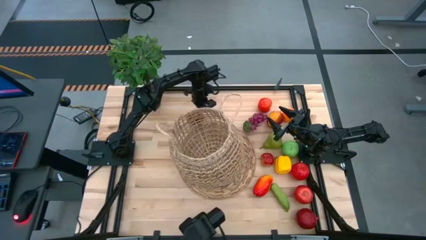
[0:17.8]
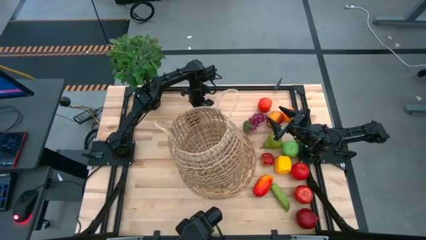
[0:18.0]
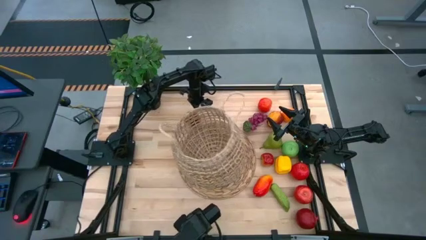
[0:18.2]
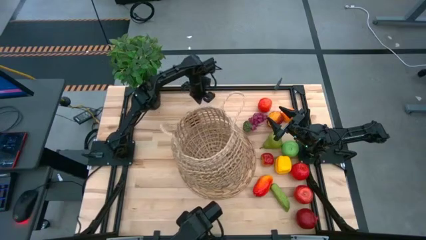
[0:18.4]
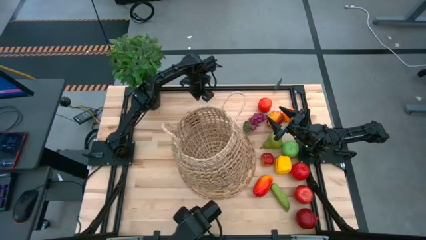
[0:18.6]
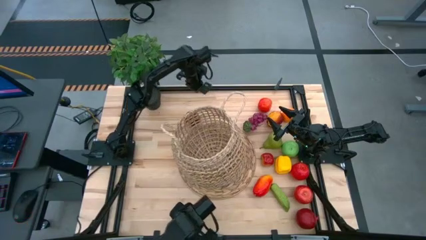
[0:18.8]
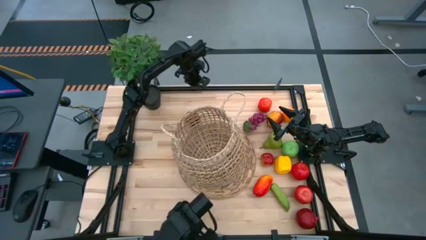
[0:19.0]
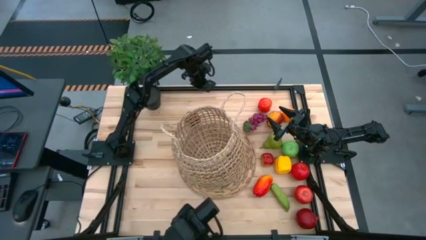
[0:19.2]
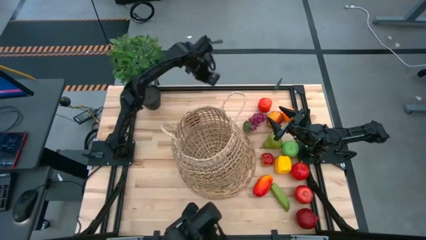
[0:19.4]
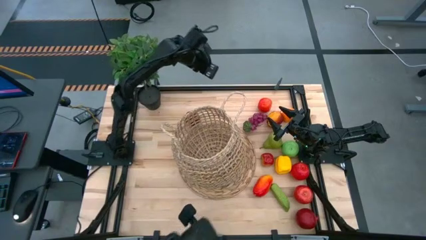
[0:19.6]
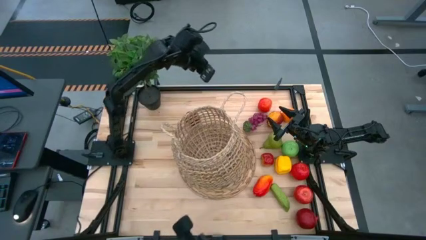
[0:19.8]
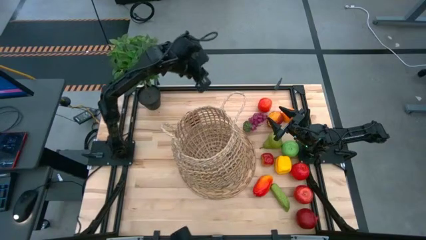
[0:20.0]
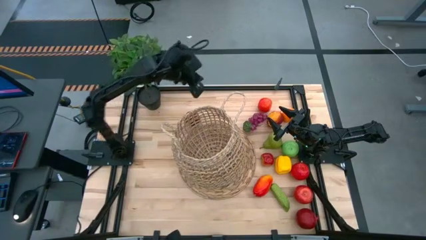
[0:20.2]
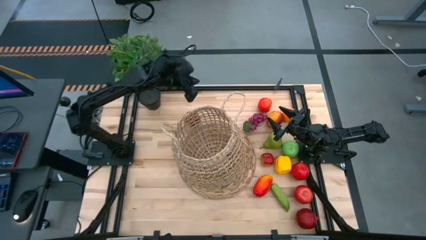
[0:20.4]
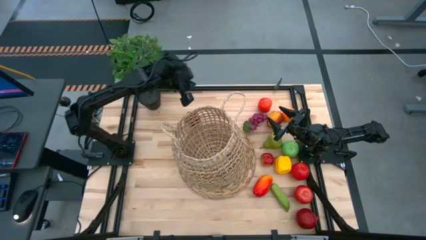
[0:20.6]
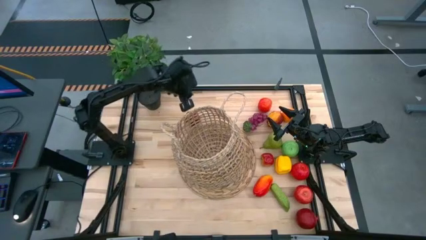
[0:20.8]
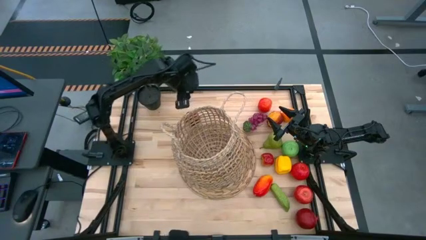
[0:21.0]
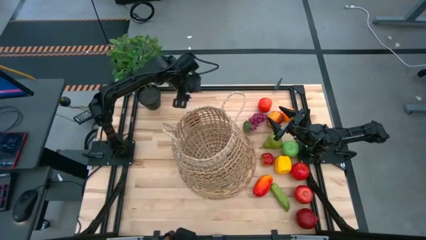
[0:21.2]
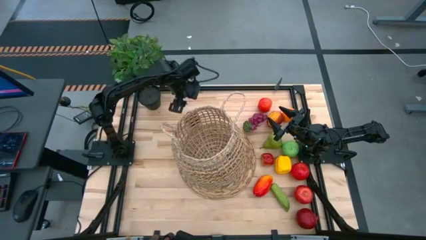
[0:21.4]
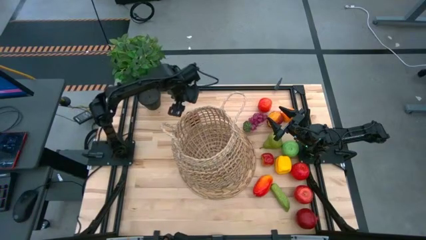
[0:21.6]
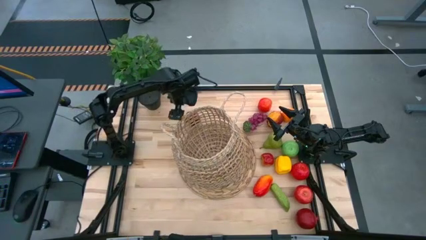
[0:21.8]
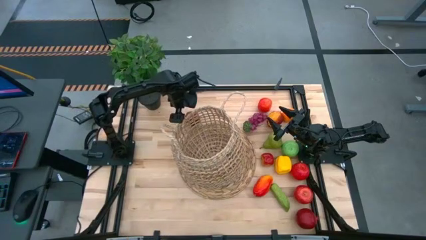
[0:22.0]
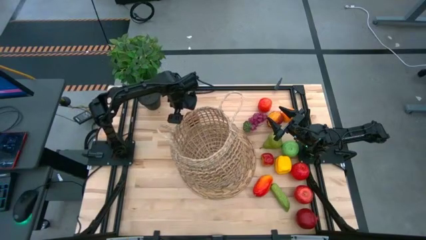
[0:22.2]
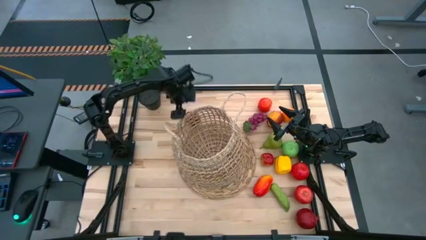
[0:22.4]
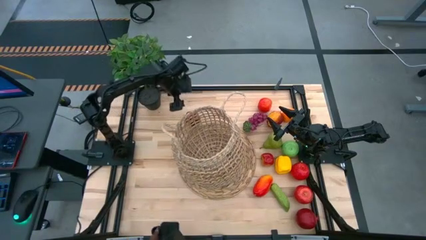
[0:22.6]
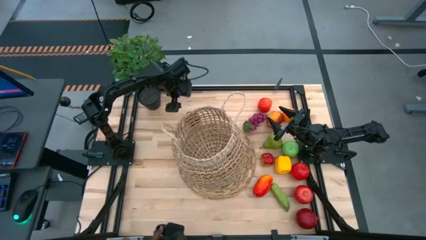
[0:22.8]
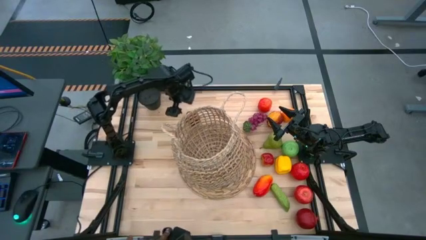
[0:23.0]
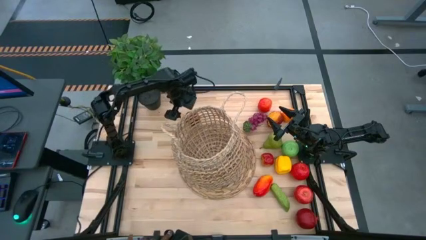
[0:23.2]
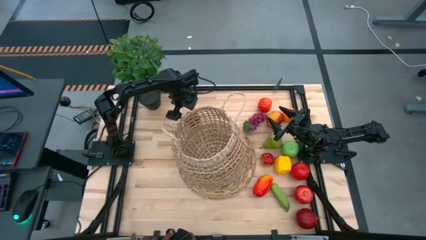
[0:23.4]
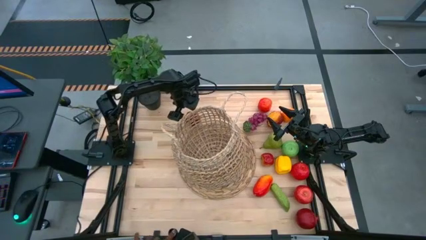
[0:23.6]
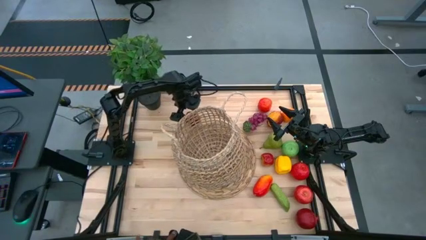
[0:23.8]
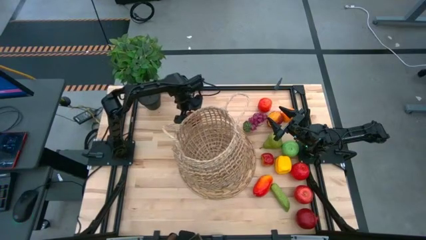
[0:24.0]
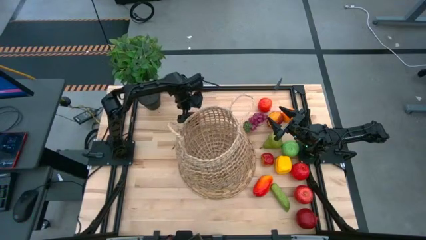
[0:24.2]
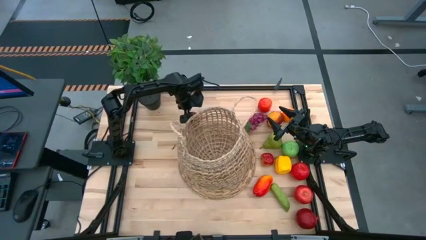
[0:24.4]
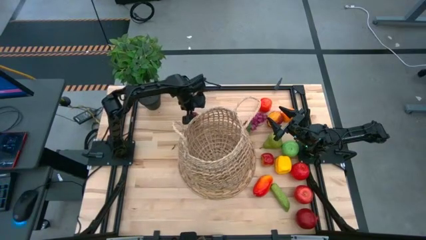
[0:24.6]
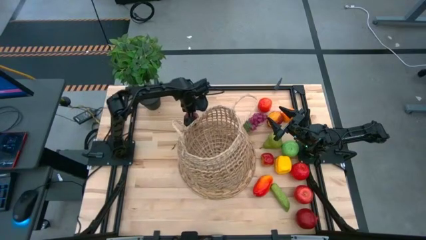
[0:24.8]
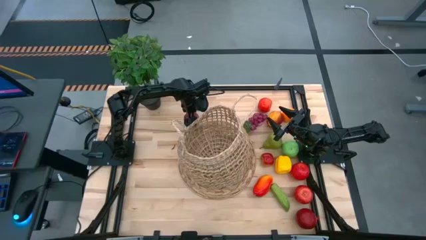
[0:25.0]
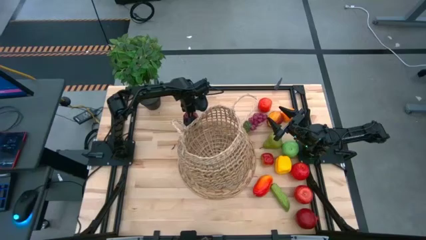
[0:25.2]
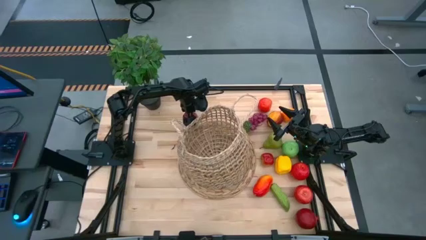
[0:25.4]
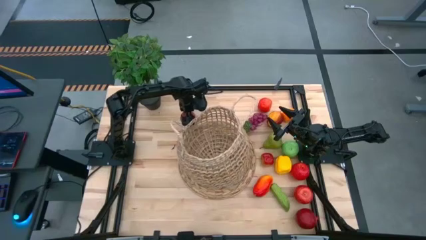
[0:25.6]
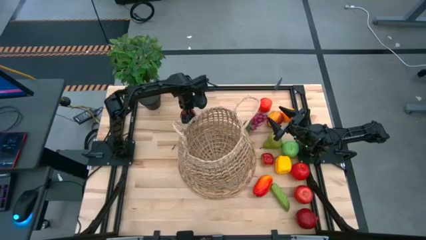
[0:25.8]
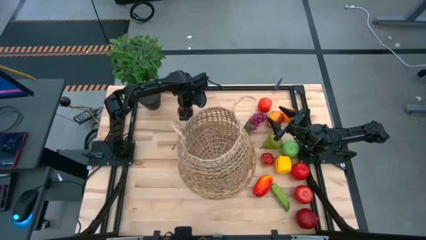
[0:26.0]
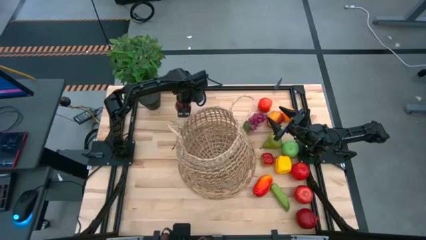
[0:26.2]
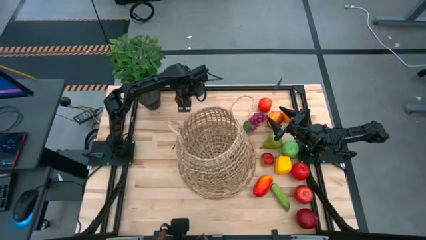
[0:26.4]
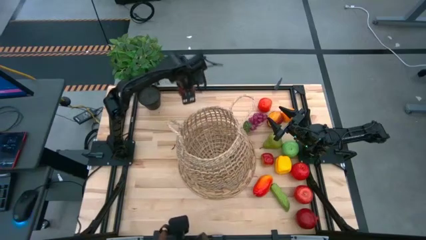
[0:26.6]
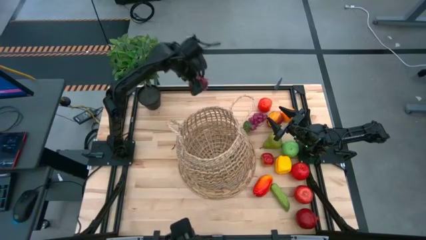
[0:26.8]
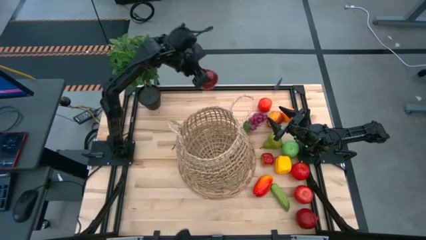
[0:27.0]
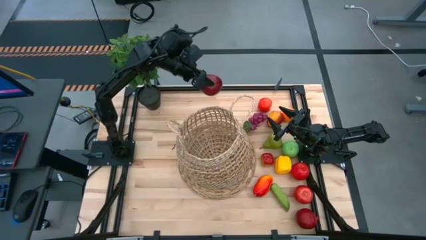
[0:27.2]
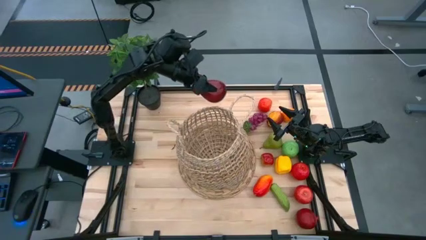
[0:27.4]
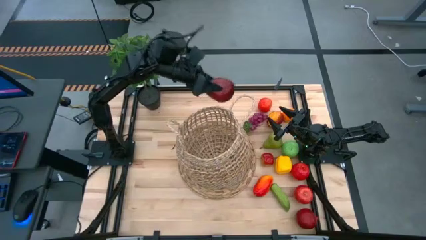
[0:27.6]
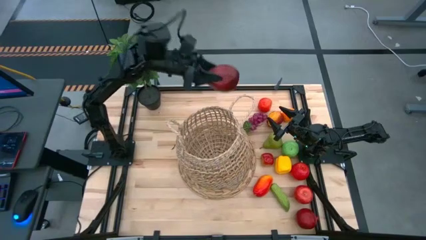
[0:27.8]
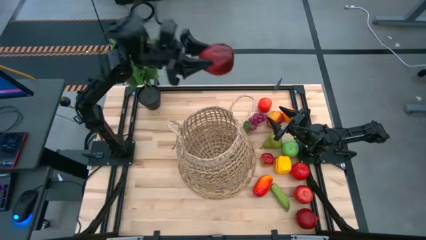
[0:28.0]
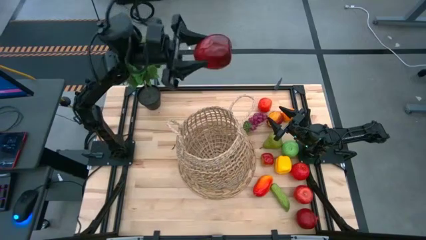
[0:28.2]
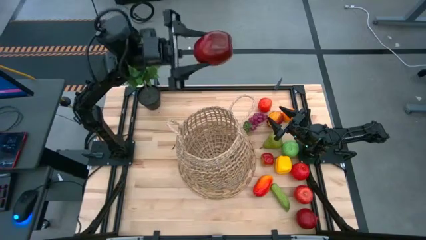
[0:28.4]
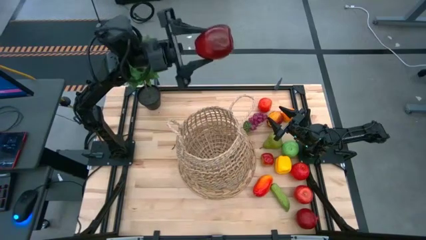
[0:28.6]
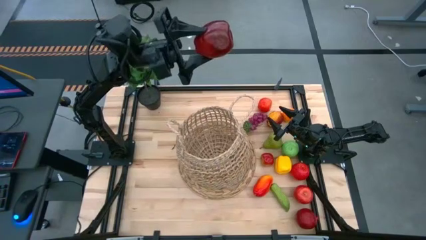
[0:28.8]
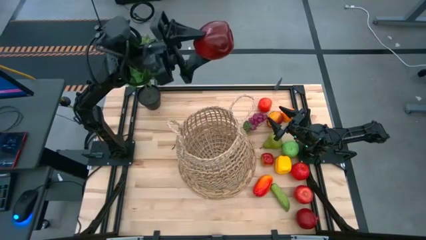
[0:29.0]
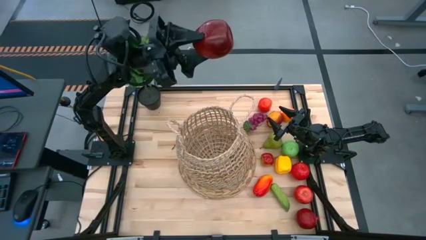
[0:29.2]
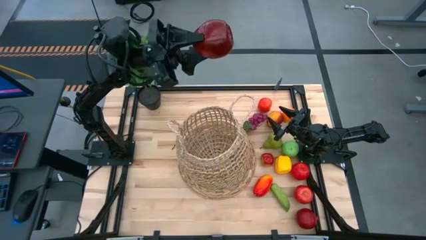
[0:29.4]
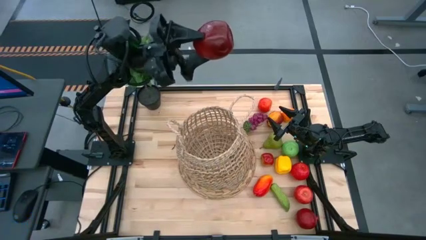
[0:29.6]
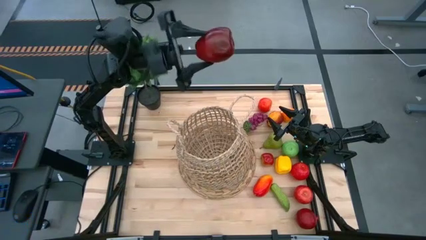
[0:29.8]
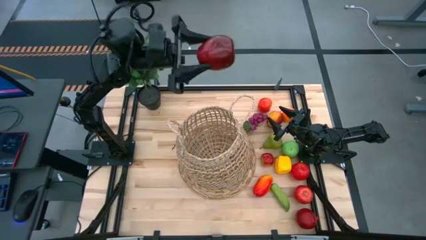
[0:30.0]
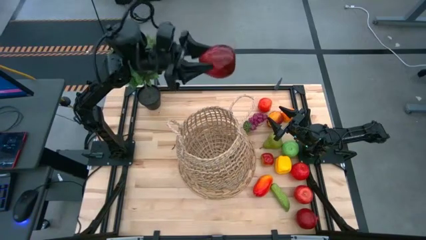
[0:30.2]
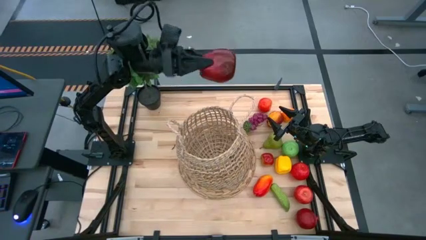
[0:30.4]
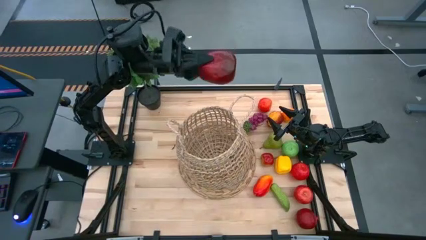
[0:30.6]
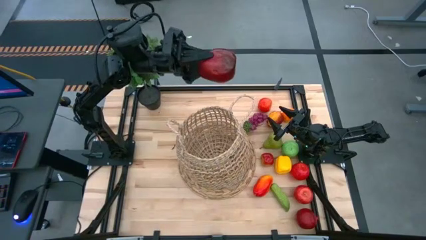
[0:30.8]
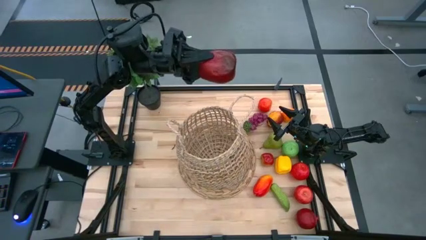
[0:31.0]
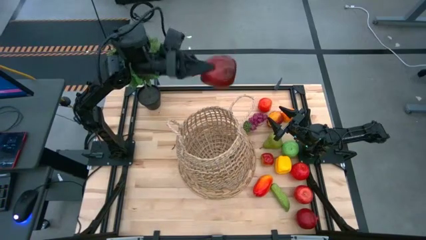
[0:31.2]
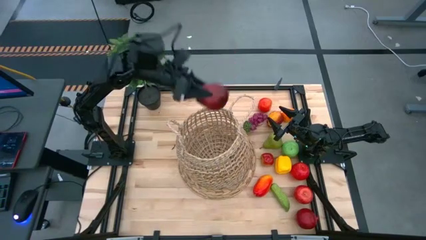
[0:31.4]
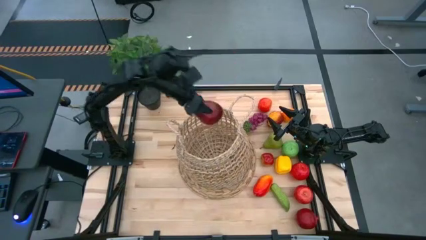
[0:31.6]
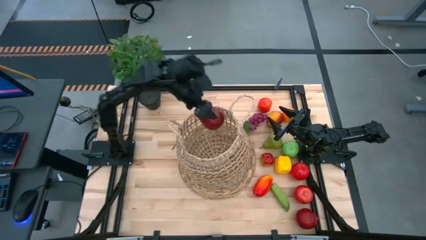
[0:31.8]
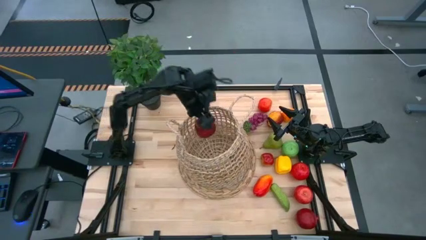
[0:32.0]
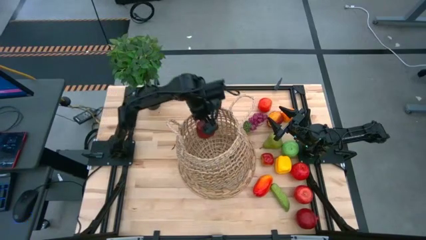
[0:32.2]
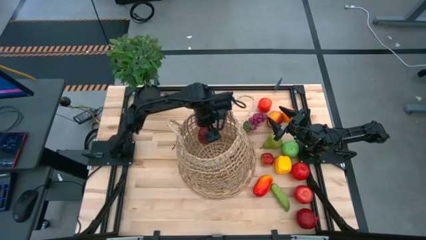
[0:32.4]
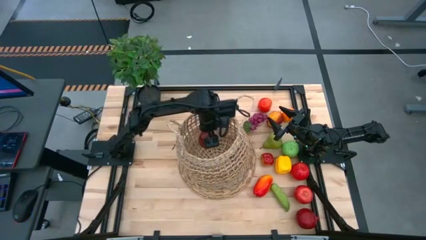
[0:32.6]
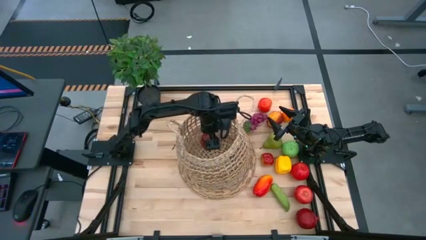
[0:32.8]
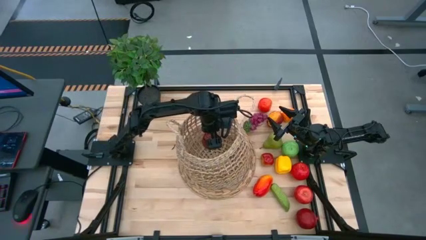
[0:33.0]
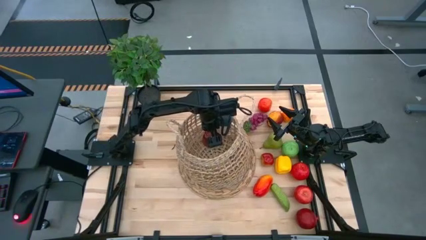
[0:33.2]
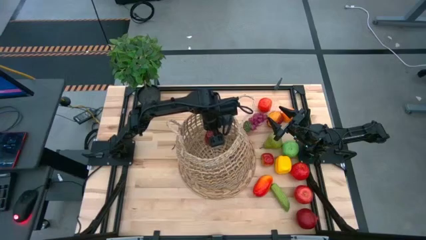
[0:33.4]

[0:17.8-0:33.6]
Task: Build produce basket
Put the dark red apple into the brown basket
